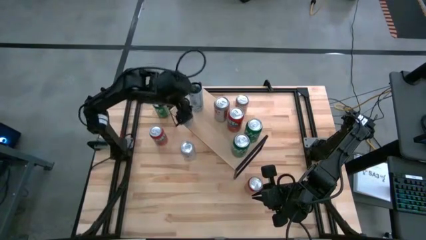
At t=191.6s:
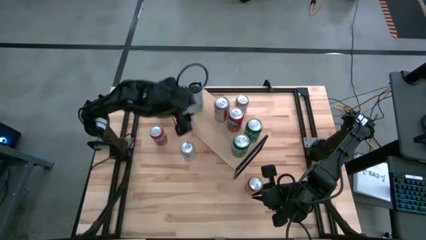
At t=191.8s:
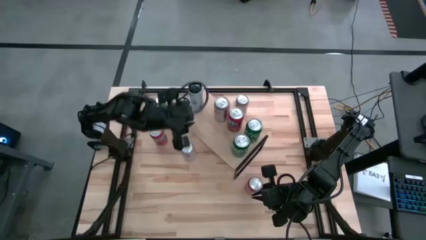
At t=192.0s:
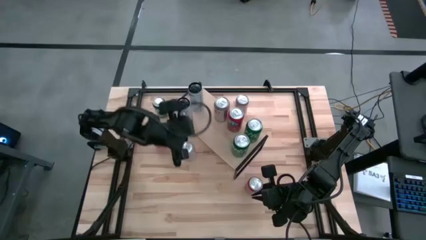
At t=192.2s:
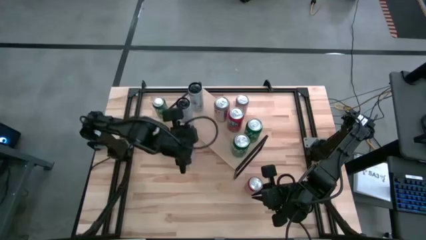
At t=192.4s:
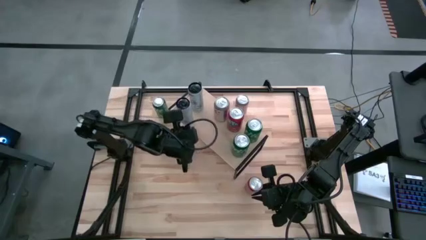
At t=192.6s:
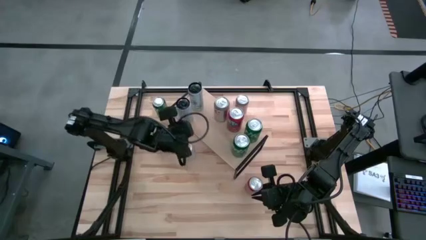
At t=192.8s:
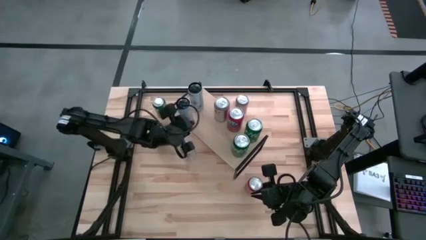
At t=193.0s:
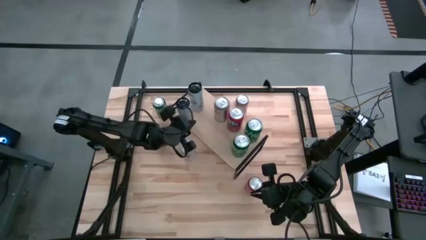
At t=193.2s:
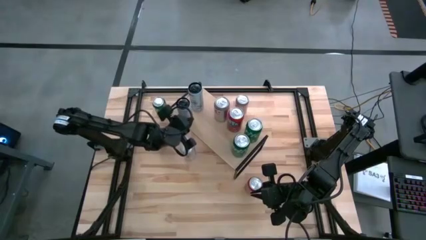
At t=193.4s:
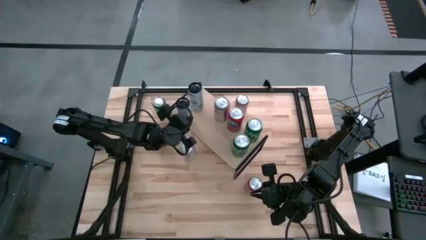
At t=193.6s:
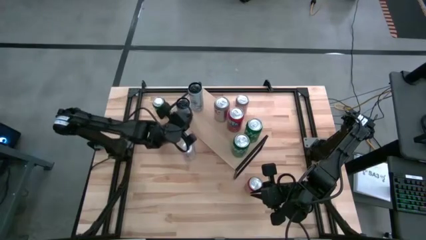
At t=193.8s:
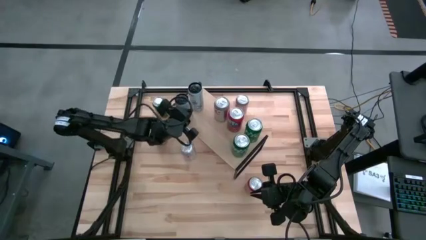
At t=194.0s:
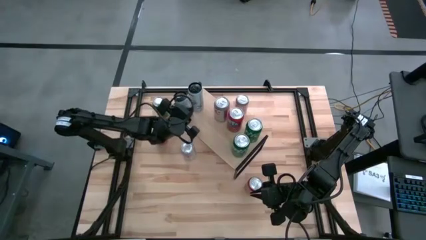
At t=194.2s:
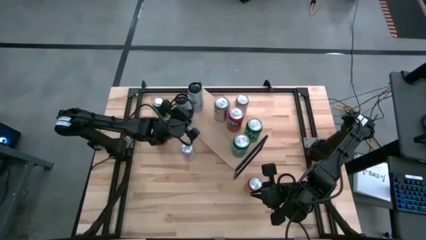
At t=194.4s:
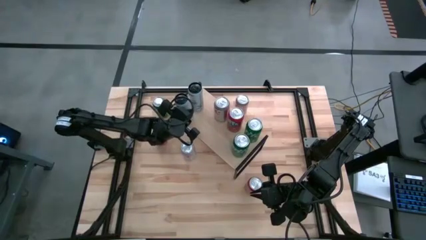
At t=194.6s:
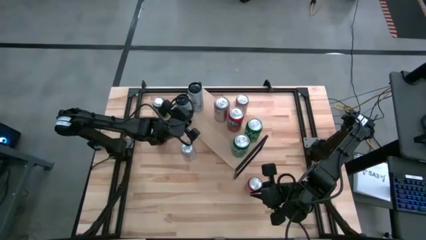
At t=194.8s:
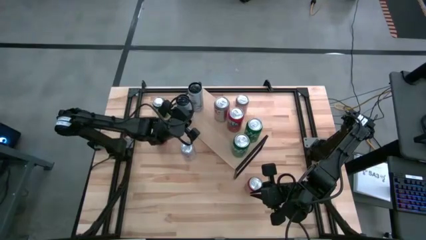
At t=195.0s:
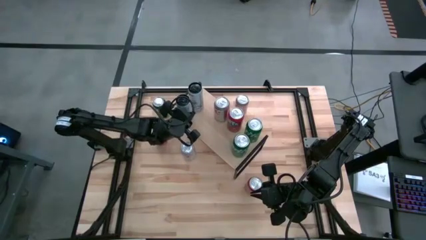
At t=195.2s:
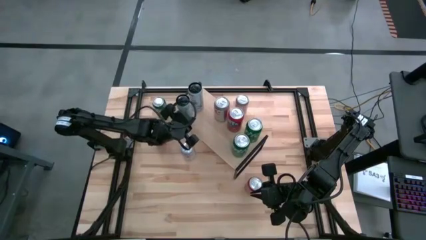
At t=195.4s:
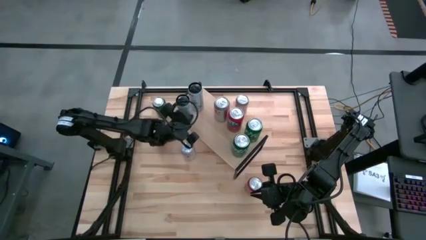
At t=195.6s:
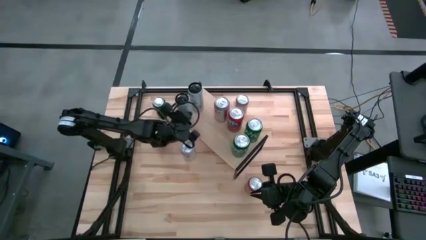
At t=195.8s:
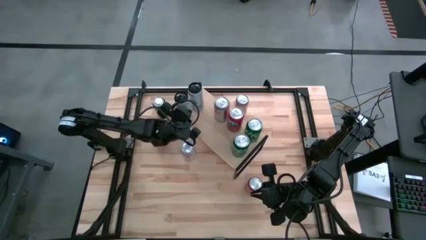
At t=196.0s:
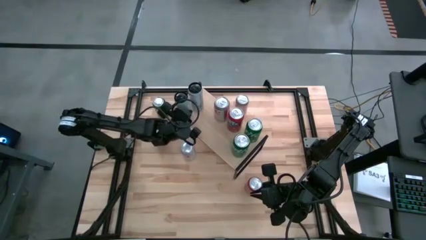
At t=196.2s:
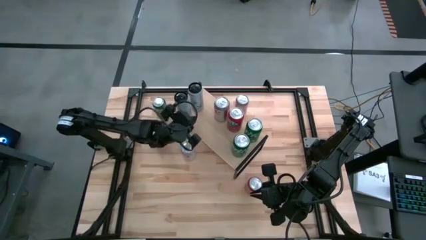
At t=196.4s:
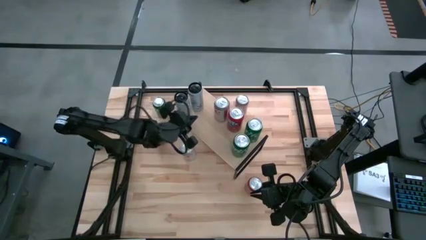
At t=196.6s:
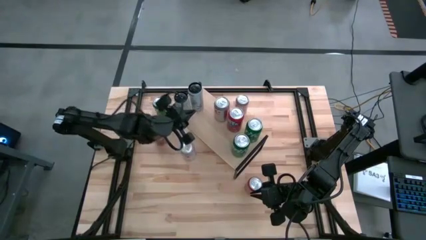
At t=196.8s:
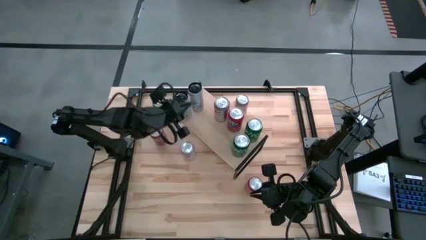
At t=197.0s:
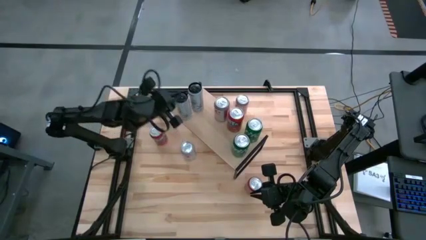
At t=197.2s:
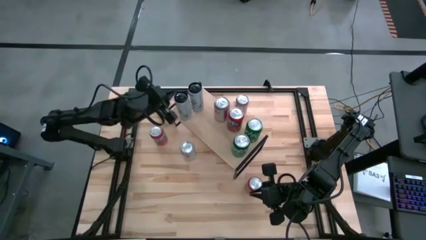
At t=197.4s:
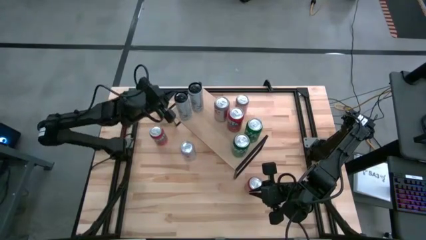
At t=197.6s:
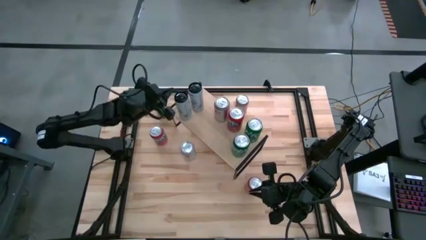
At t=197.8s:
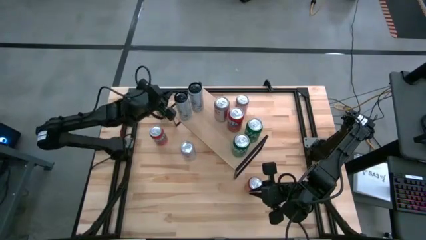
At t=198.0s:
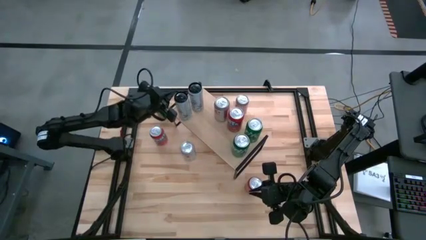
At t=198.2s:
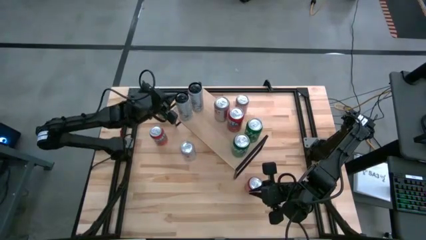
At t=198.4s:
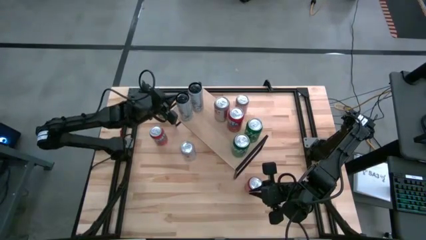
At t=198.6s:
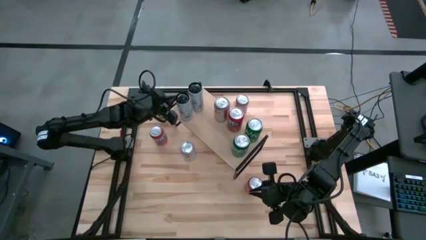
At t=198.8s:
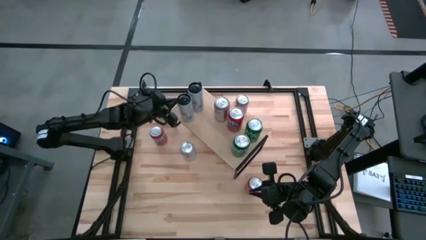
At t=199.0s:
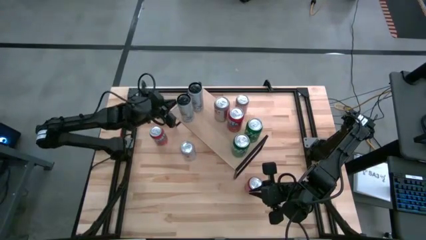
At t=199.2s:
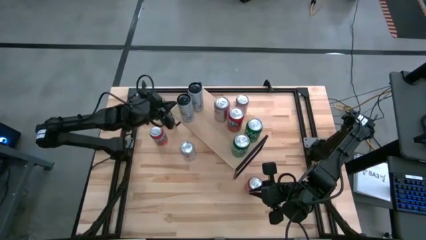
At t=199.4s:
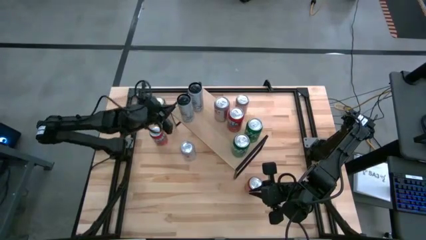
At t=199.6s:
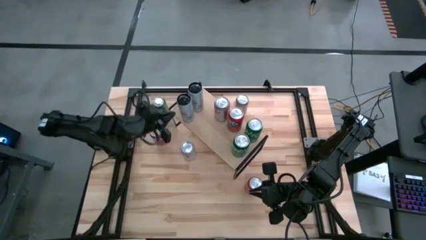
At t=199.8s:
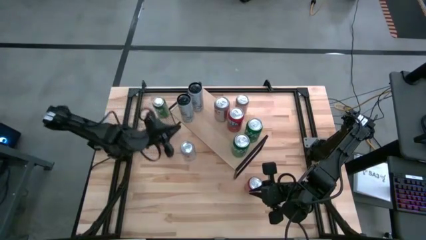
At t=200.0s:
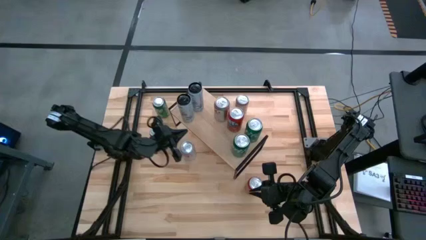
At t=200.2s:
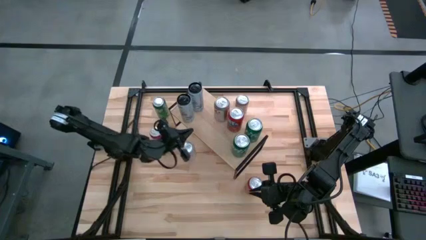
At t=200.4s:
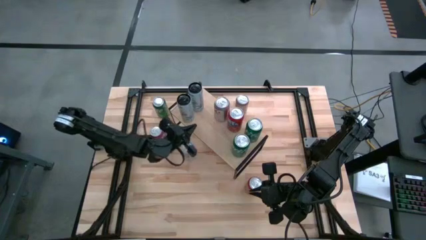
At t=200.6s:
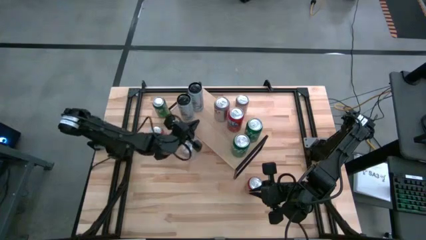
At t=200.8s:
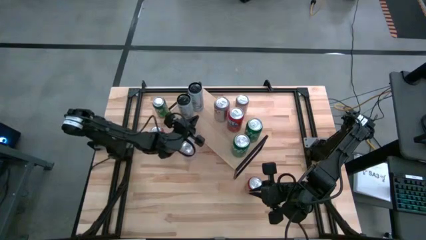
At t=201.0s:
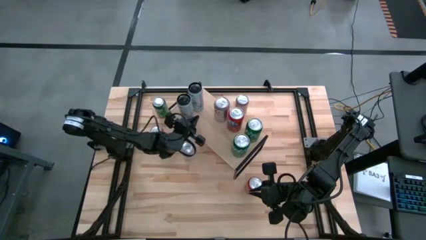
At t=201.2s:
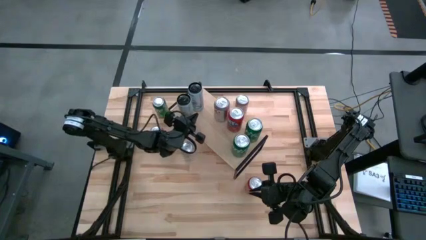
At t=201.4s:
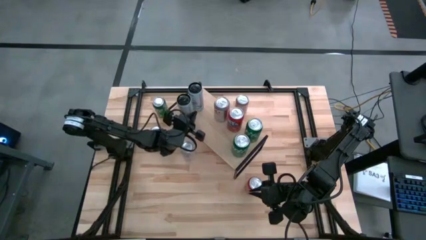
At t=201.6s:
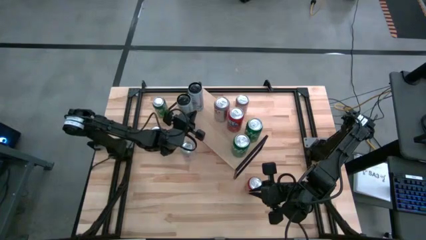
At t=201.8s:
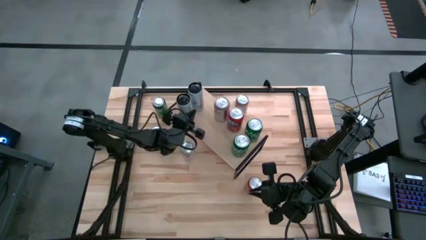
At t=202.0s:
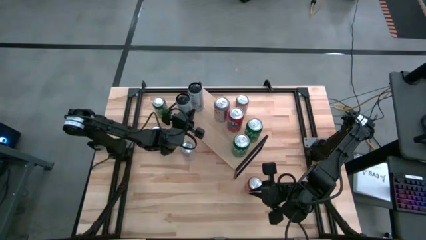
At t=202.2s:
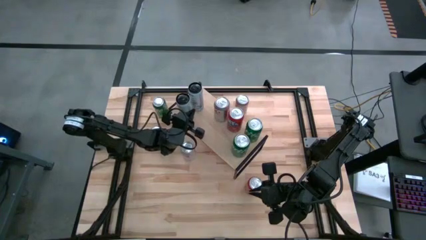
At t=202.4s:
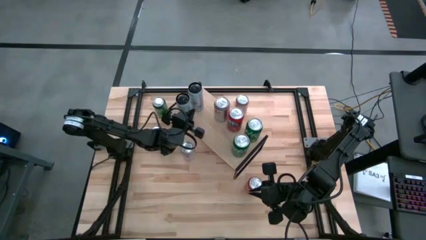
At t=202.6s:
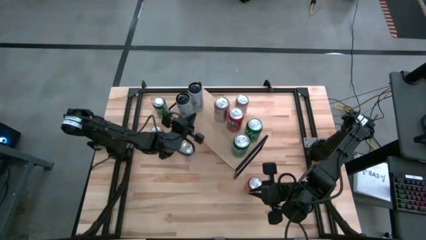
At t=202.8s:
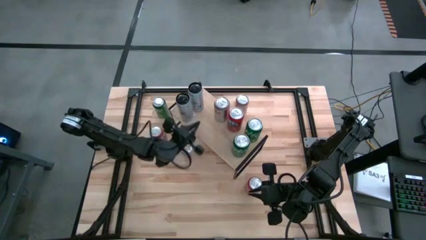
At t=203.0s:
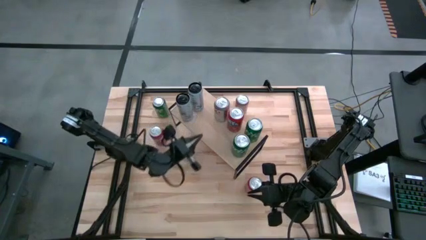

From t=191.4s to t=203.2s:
Task: Place canned beverage on shelf
Put the blue soda can on the shelf aligned with the other blue soda can

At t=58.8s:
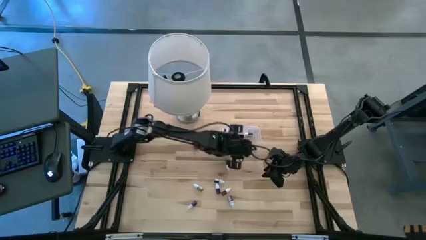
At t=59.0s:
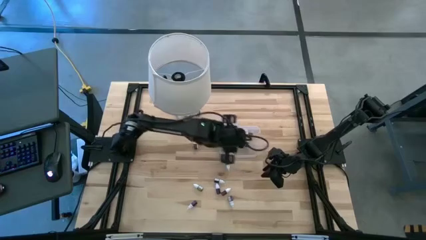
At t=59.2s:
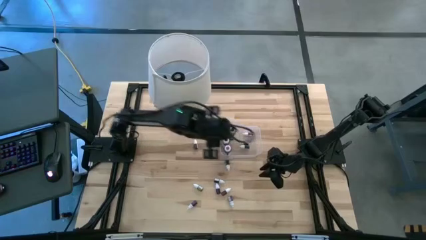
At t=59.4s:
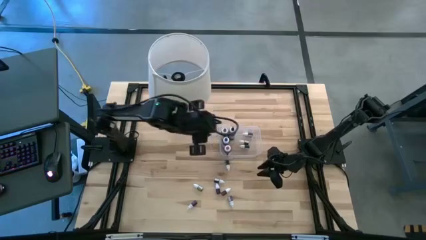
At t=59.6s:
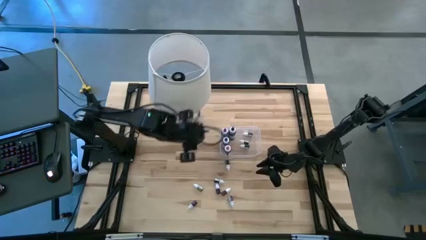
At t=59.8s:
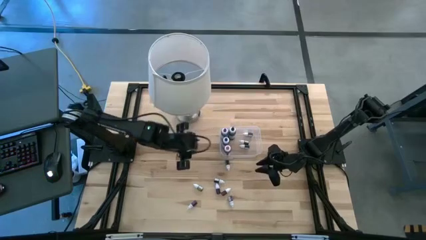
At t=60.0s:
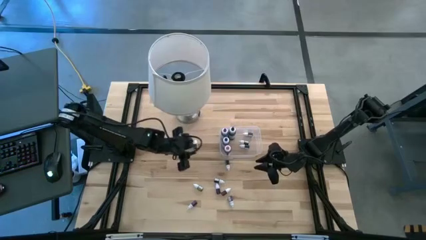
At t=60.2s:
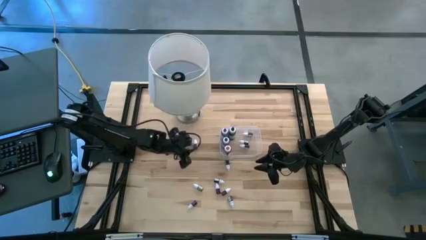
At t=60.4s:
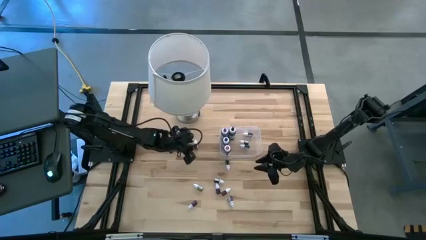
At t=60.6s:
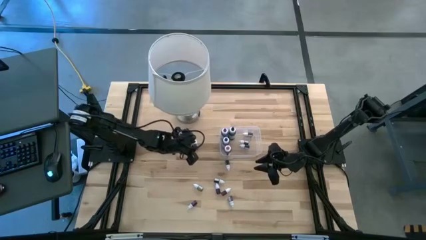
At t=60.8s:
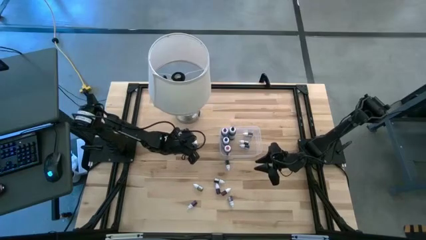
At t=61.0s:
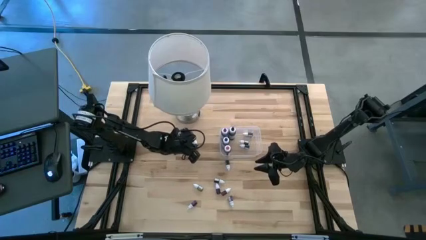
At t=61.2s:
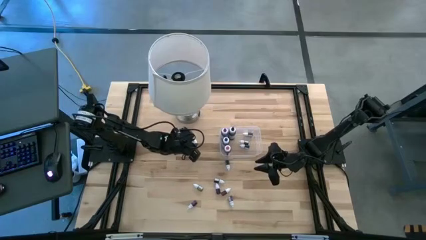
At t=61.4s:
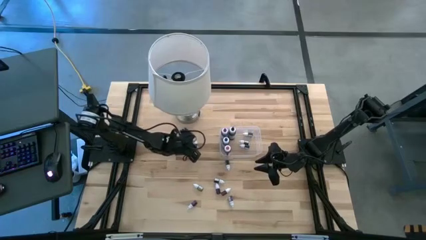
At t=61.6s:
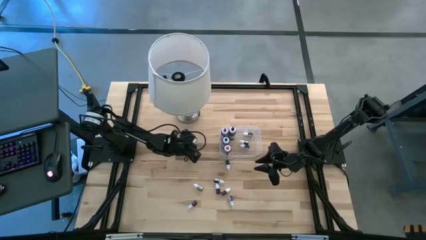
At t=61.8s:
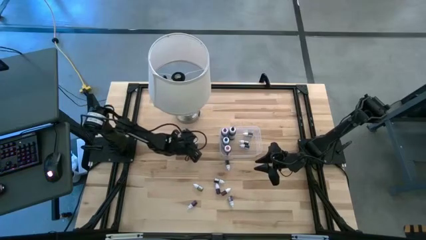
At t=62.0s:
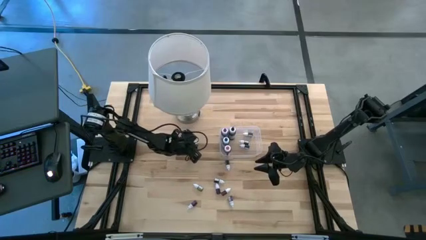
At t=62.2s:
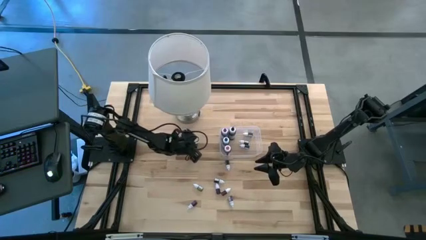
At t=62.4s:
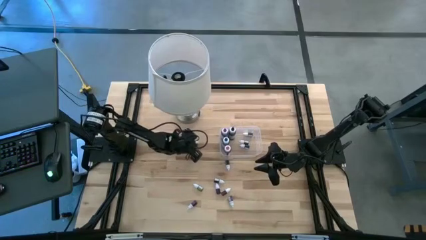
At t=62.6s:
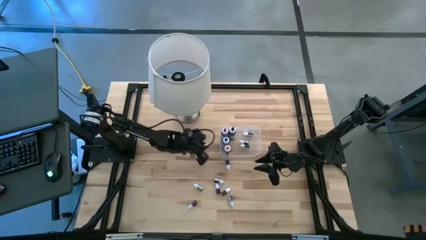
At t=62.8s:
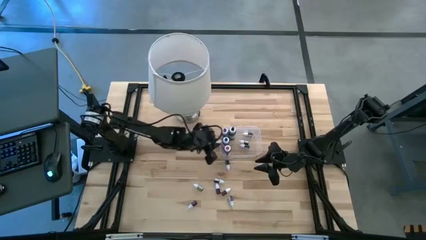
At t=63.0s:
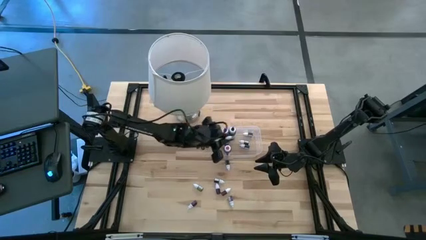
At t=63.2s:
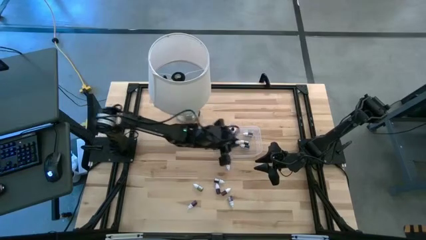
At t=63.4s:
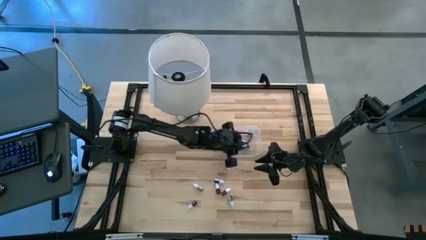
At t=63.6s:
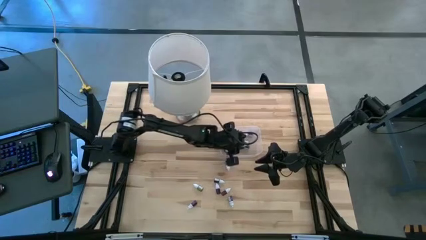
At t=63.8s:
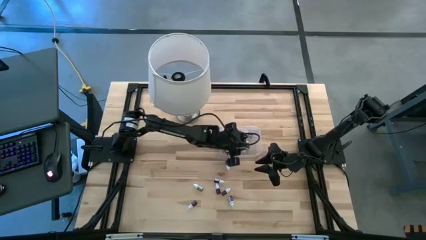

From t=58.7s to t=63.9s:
Task: Pick & Place food coloring
Put the small brown food coloring bottle into the transparent bin
